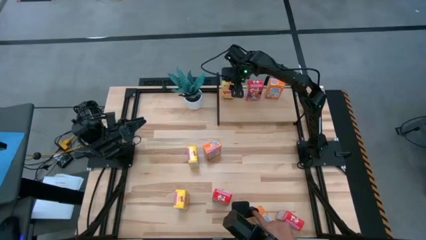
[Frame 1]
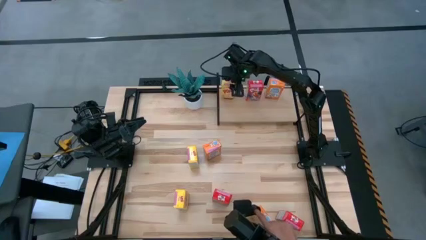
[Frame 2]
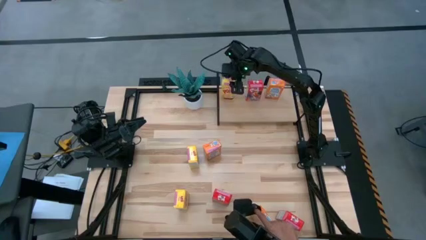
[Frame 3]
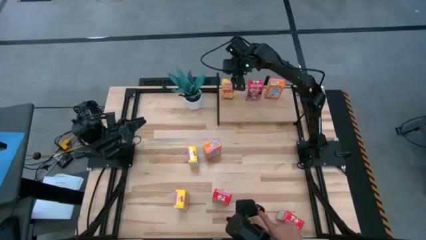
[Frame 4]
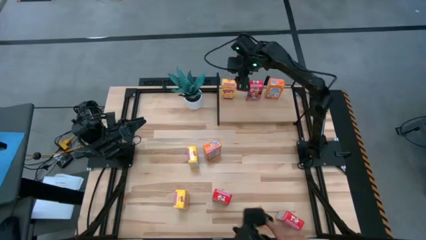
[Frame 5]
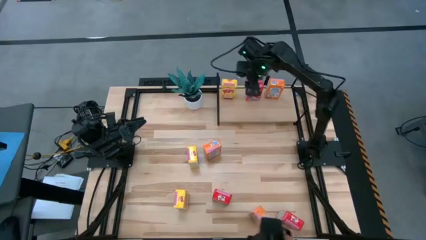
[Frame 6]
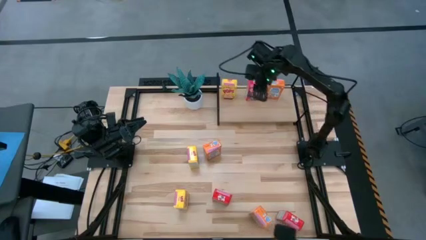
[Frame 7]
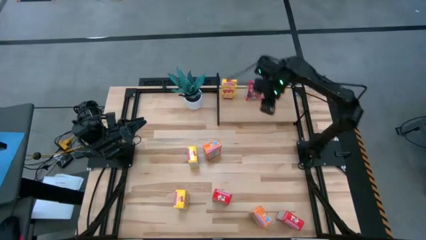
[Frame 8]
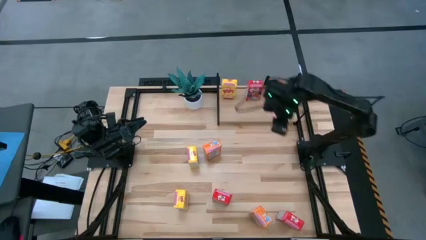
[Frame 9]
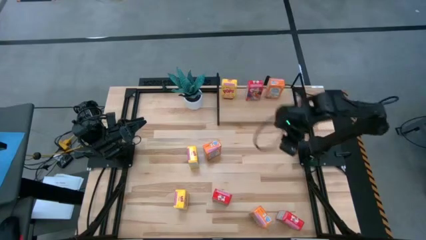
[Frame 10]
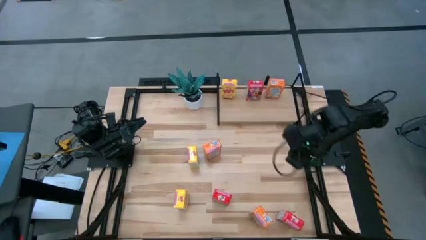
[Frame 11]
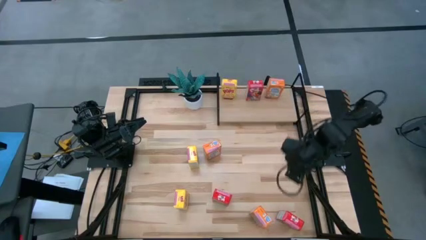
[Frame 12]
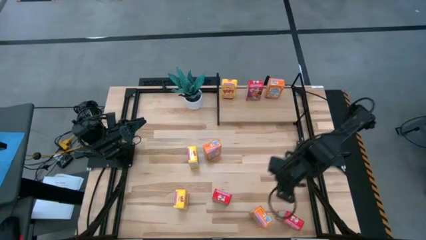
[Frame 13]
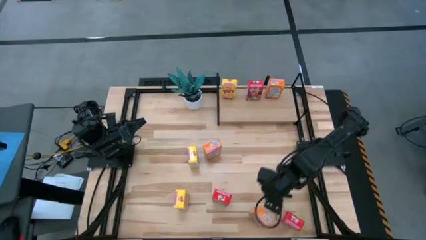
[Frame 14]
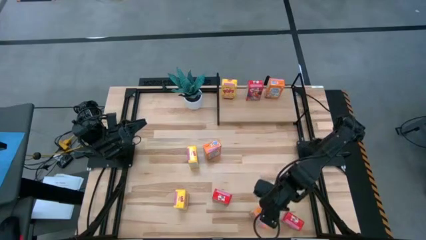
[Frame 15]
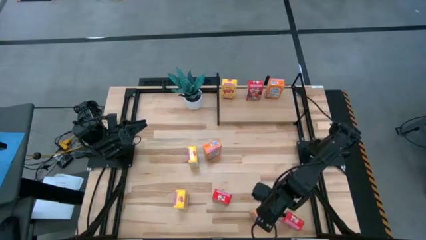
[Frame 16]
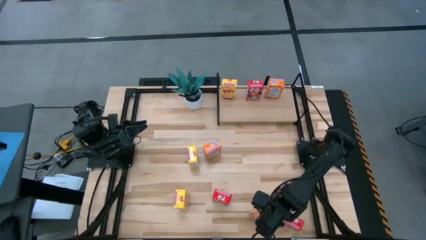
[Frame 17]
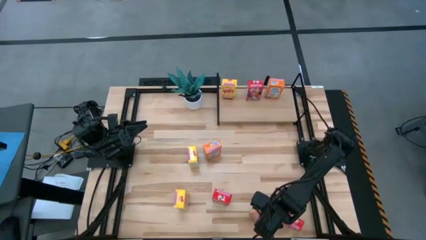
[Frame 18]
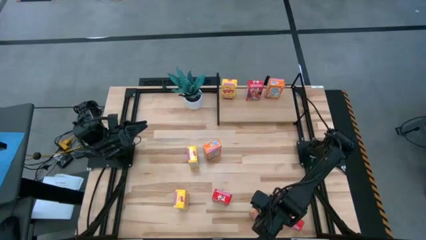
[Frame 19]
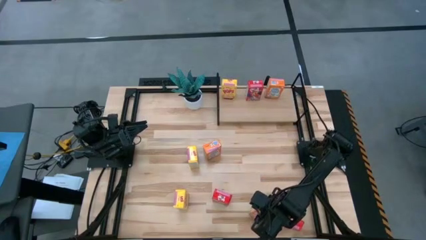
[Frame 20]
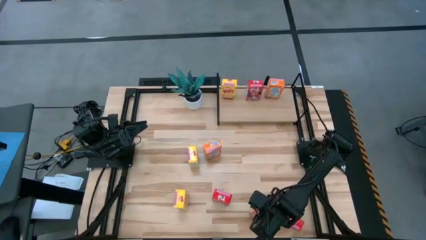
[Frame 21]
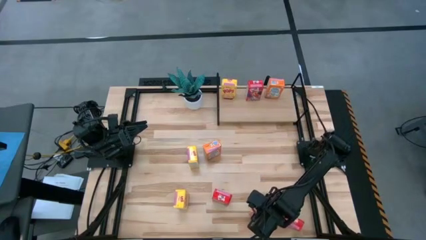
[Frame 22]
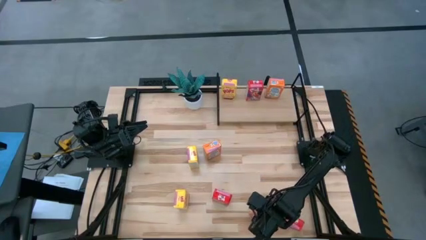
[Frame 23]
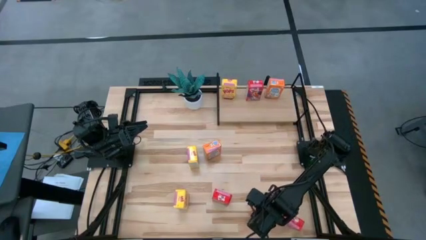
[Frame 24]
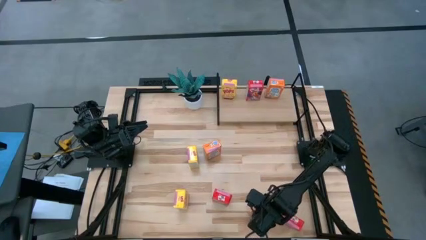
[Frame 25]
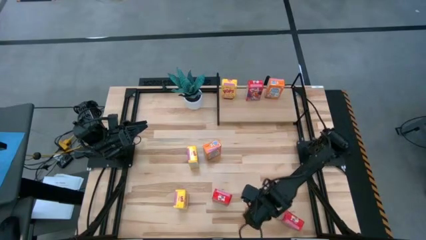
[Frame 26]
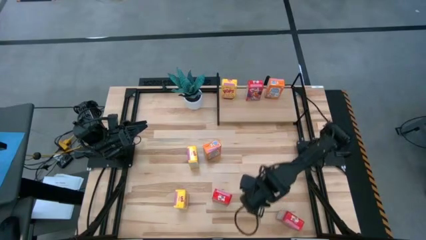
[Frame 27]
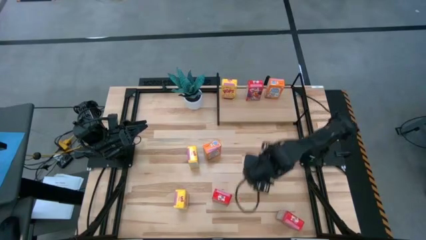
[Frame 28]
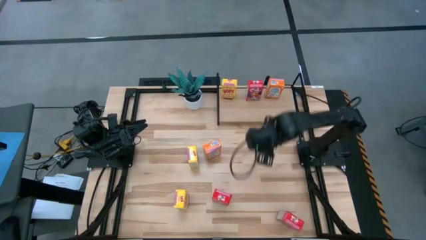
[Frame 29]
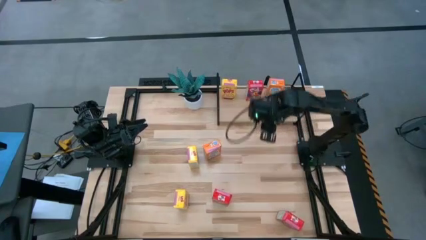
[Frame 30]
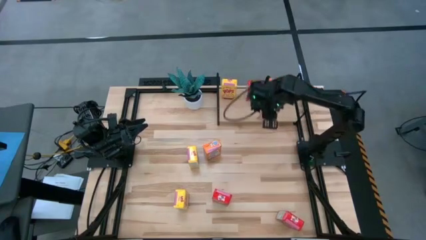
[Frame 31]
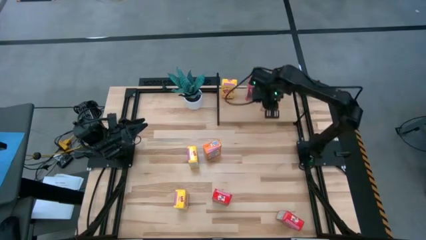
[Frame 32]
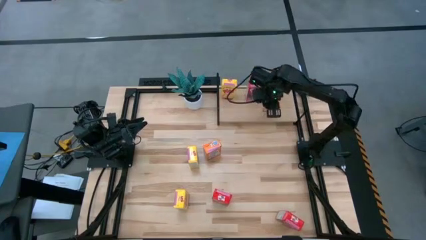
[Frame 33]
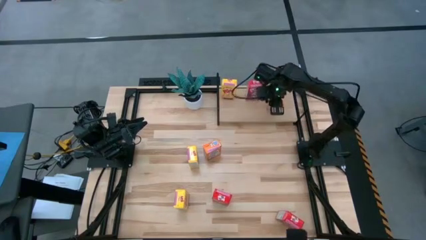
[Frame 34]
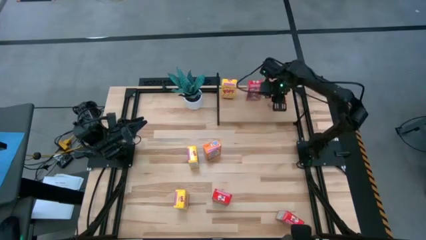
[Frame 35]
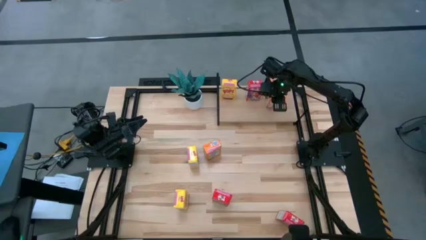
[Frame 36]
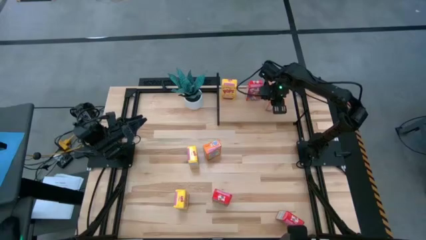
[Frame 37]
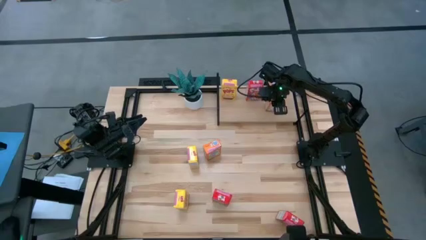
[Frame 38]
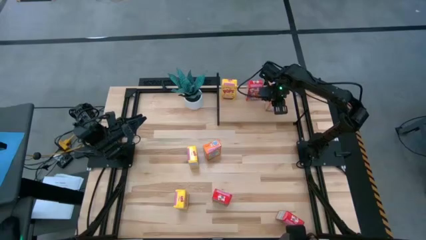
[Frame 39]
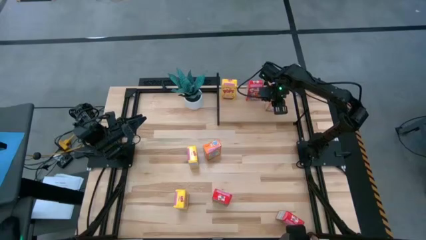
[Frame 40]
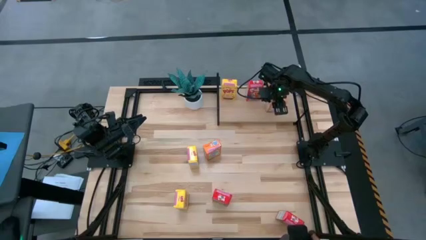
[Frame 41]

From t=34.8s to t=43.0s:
Task: Stack cereal on shelf
Put the bottom orange cereal box on the shelf aligned with the orange cereal box

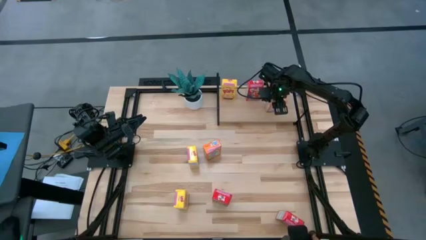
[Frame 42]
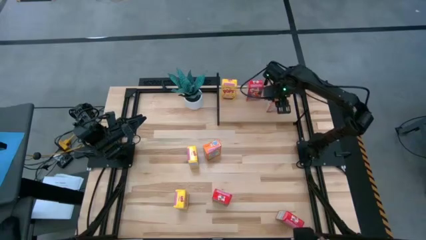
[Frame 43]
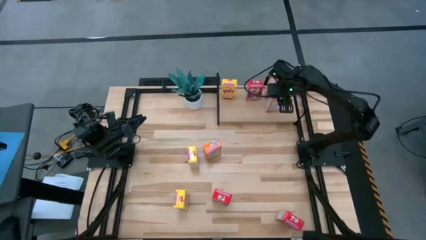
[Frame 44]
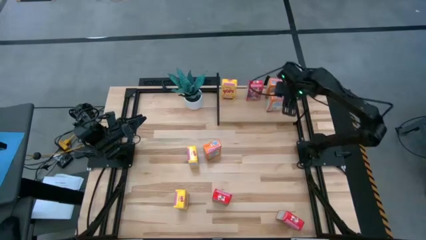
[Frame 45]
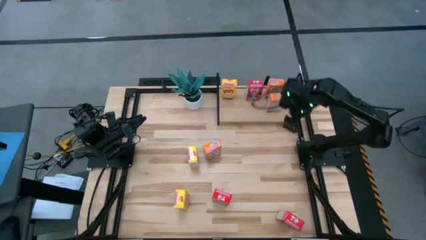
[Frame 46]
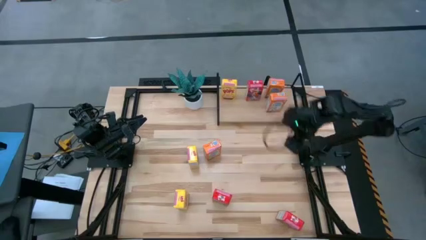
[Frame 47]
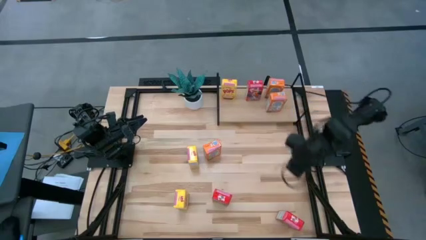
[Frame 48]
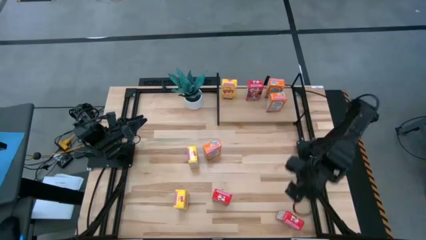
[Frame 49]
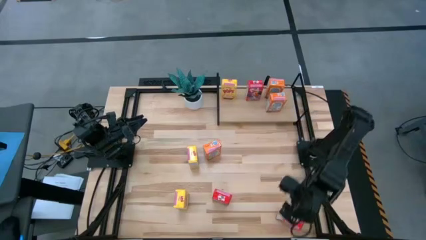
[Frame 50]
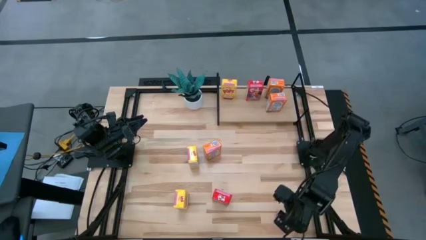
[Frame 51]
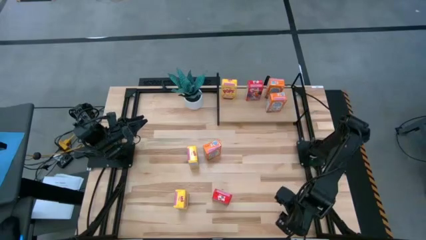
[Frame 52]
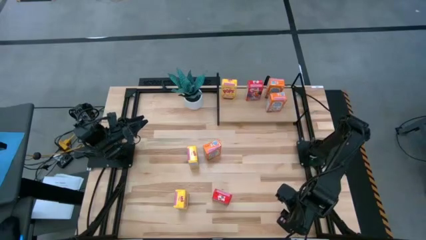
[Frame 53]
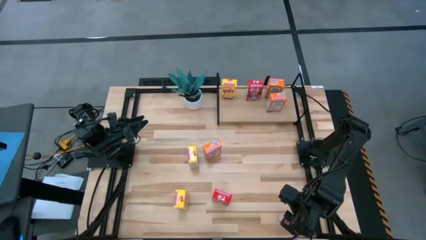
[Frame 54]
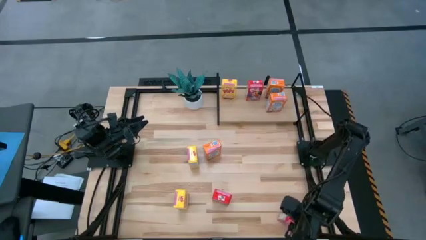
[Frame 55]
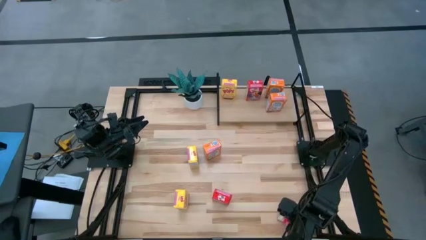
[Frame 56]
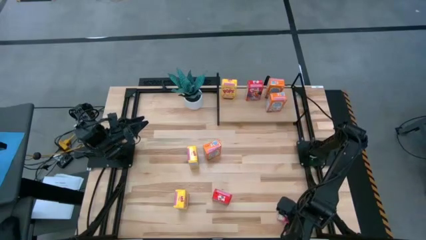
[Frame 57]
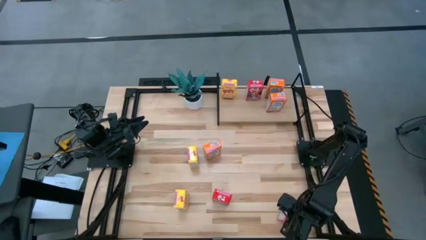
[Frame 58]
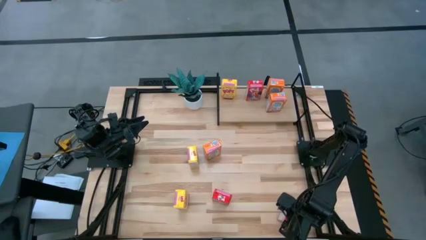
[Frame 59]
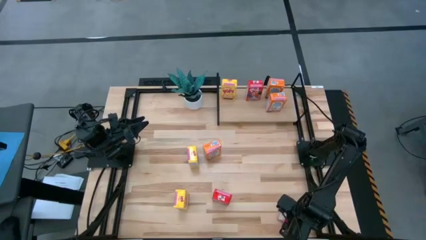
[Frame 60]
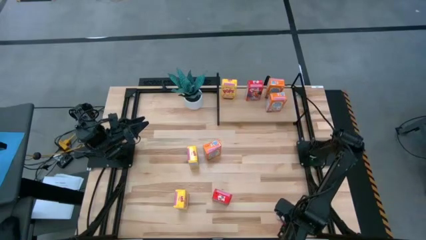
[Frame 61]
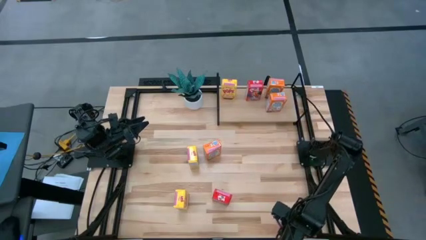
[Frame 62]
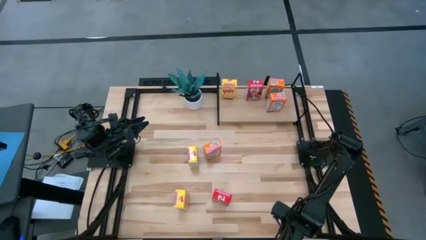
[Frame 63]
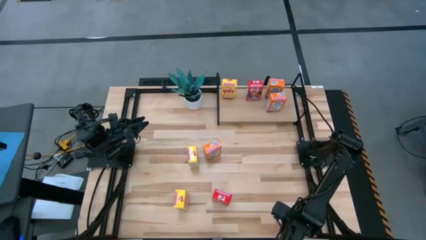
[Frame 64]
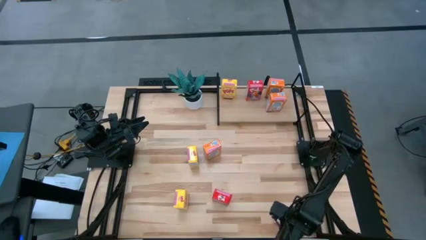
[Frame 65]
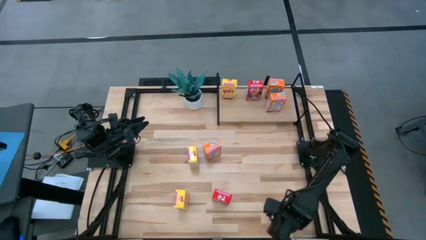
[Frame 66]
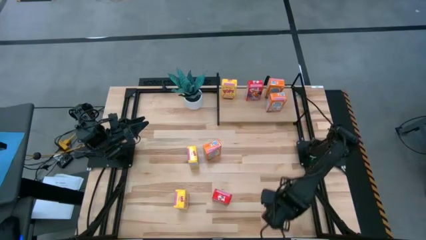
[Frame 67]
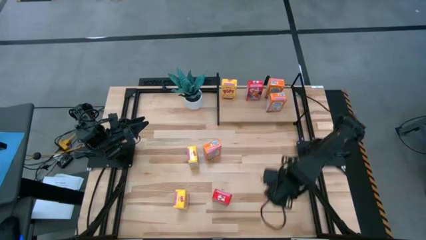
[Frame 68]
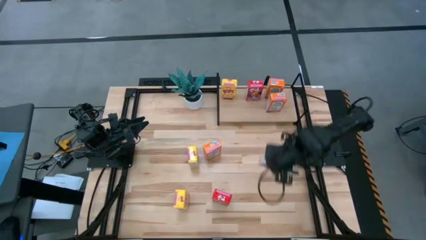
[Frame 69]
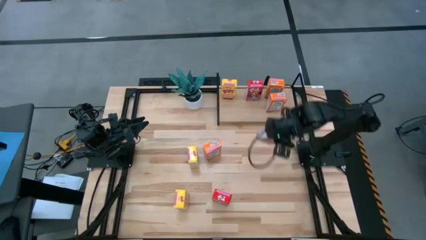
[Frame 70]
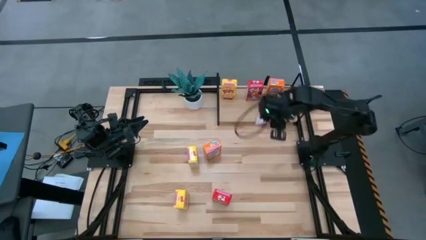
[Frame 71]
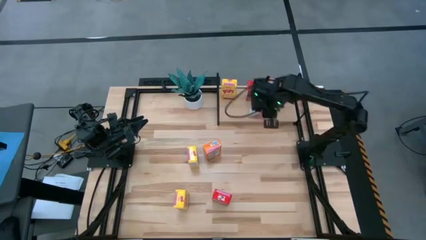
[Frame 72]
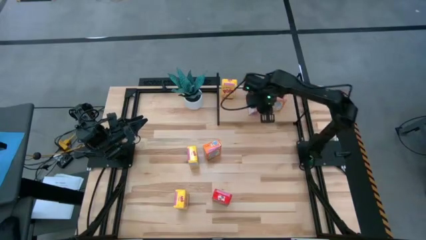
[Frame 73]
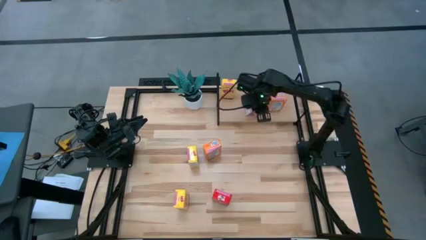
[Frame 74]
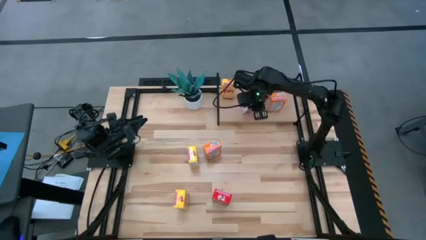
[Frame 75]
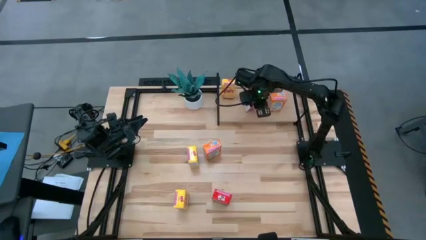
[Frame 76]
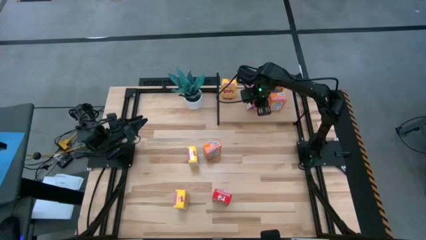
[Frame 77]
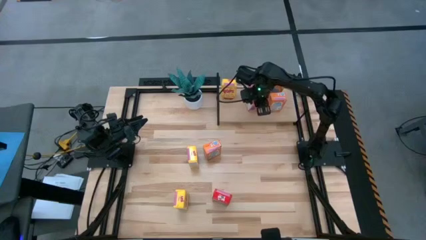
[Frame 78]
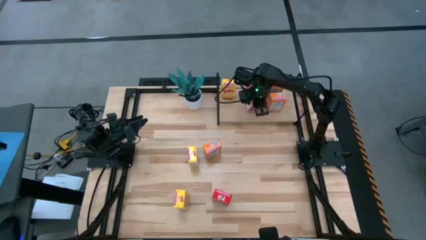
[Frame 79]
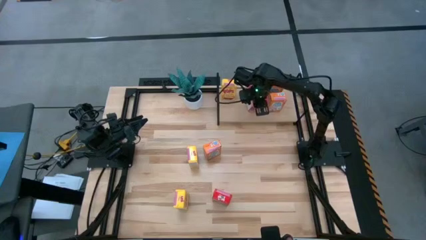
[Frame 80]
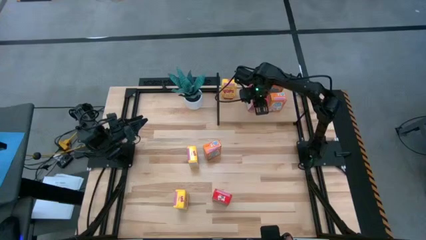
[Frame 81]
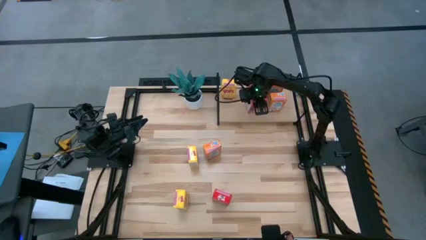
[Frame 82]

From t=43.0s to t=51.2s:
Put the bottom red cereal box on the shelf aligned with the red cereal box
